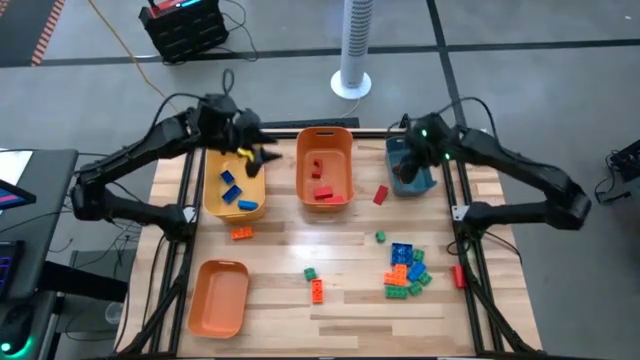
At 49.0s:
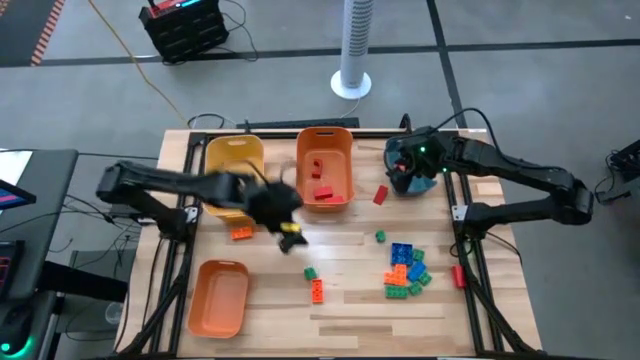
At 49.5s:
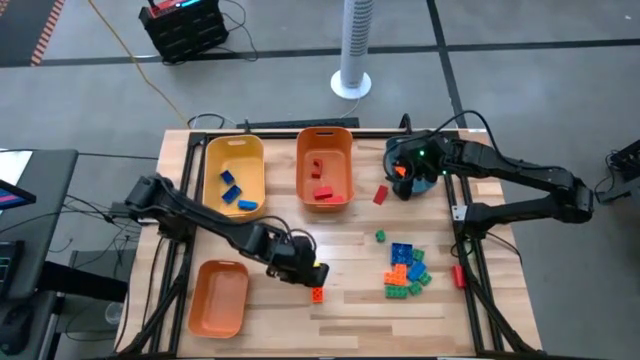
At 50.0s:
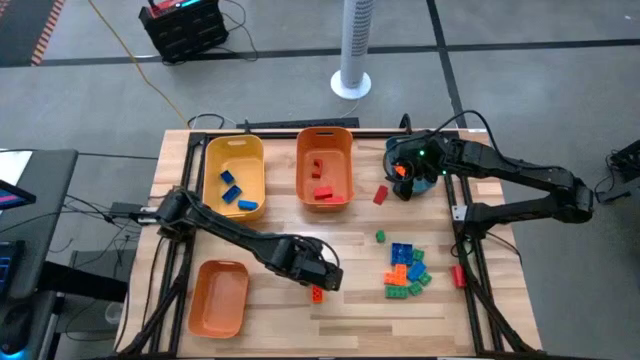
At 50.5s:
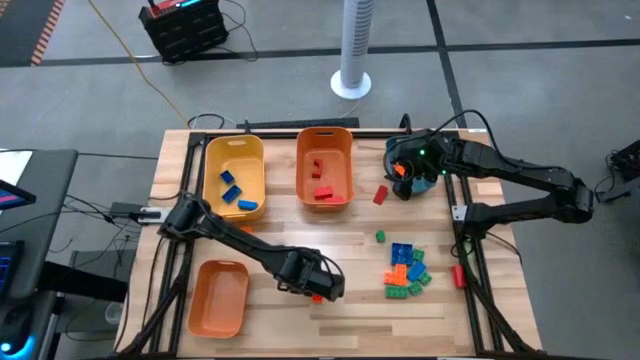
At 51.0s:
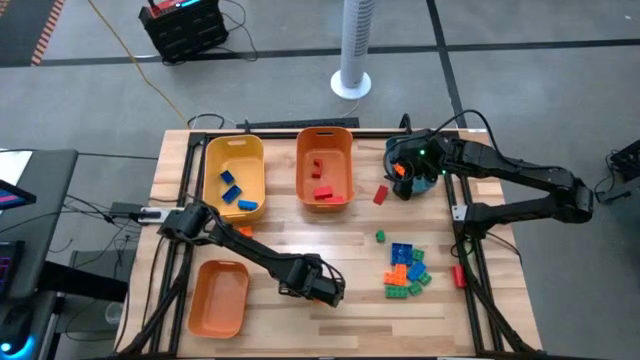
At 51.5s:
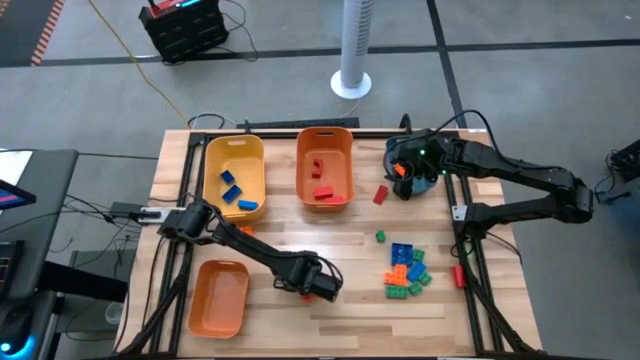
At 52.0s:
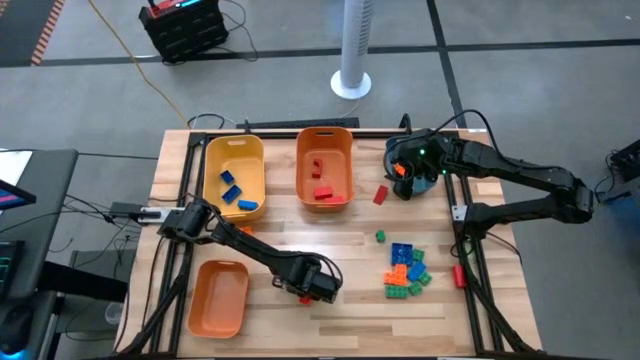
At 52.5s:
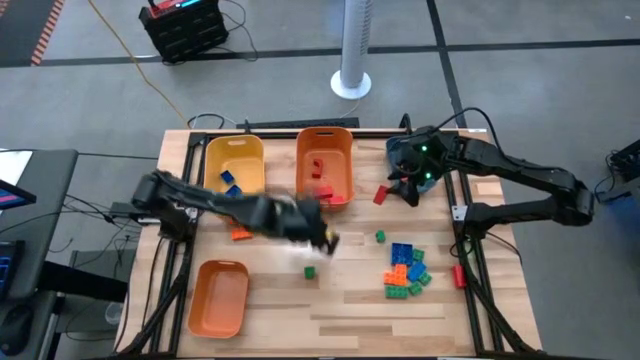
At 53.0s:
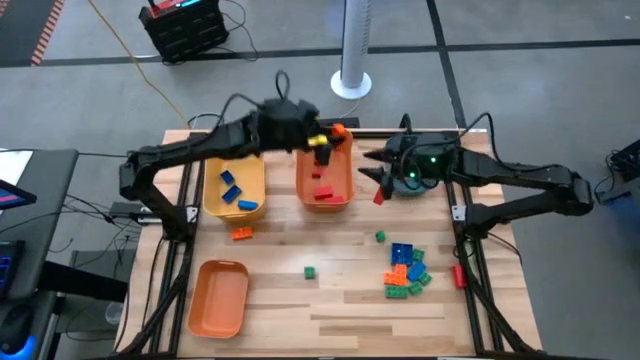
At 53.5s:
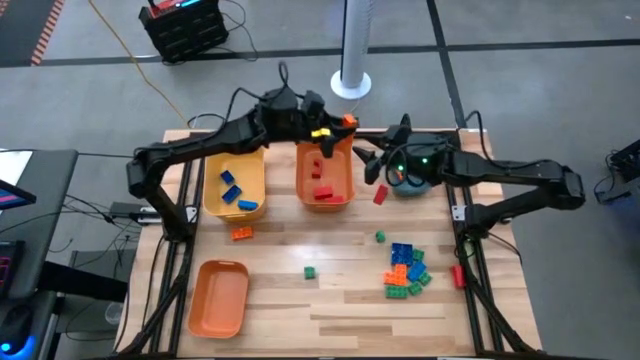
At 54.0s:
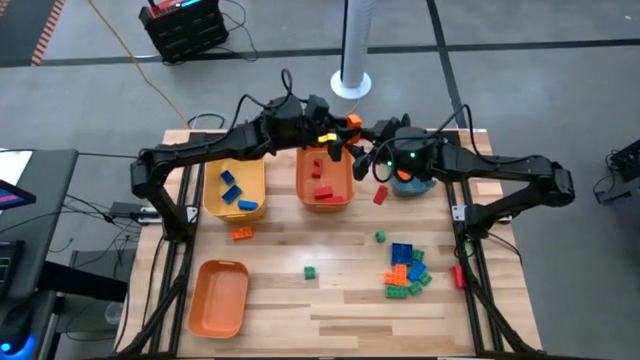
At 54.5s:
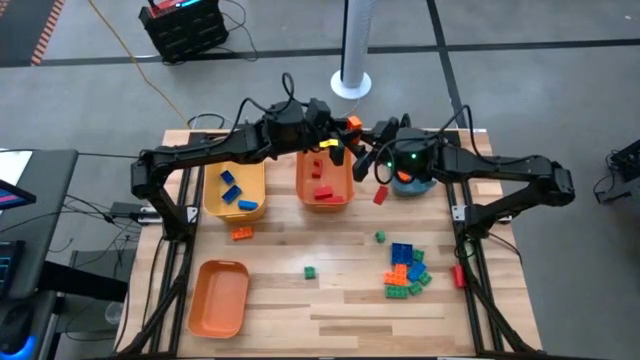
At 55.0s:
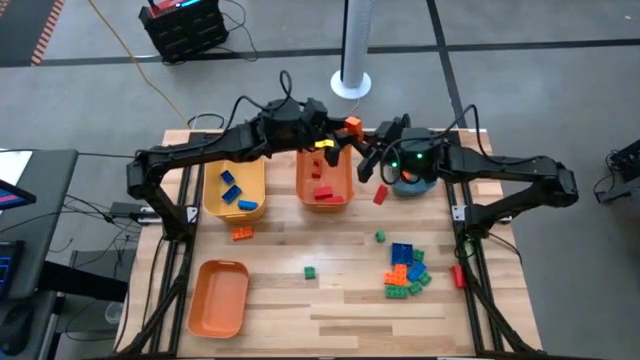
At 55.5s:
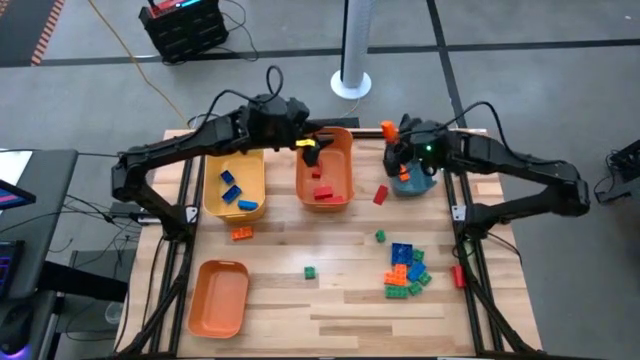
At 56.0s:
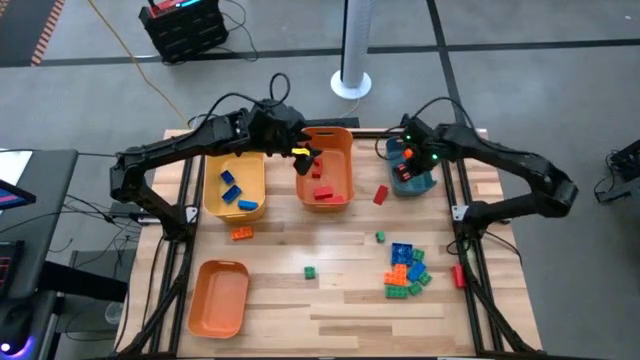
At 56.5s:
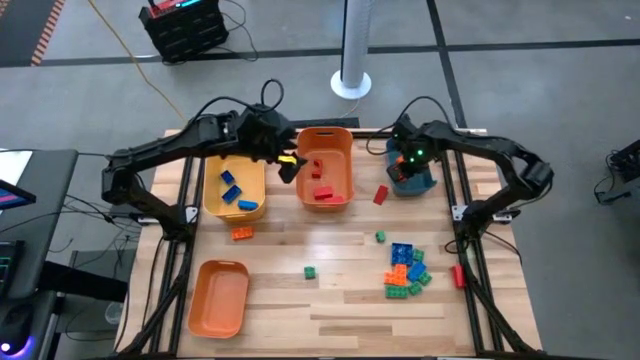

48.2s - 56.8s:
Task: Sort blocks
Put the orange game piece into the blue bin

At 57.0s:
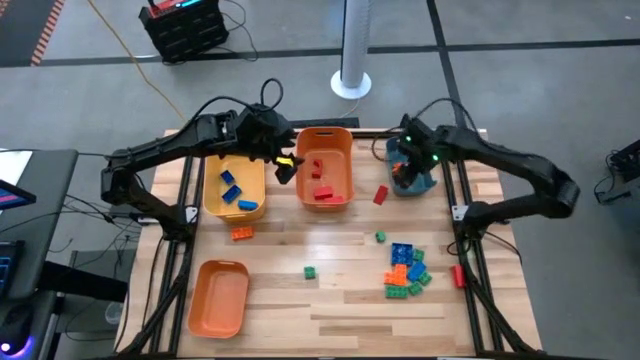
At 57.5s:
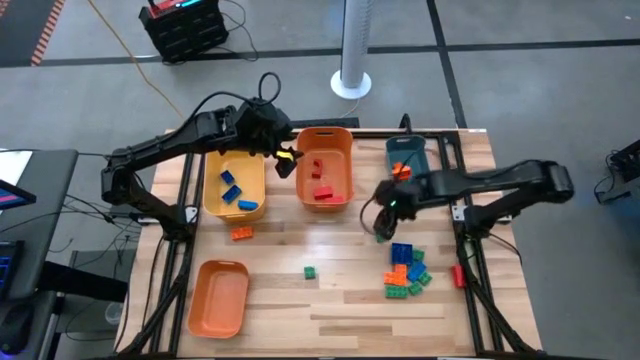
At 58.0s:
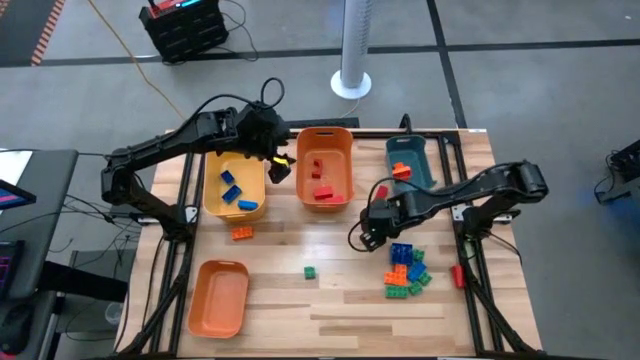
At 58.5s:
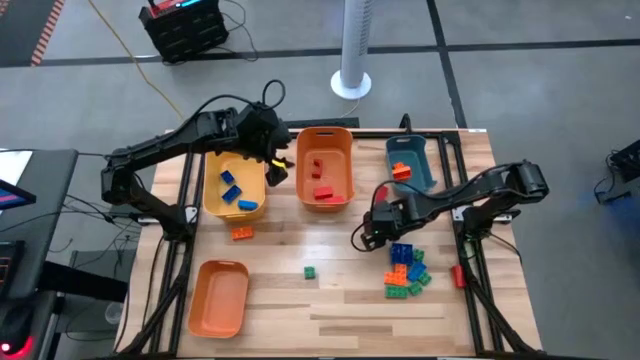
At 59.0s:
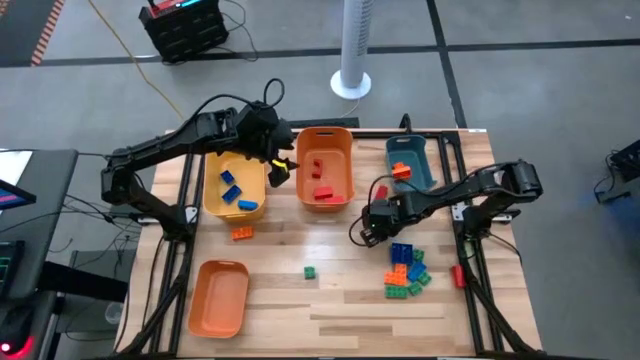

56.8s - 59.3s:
Put the green game piece into the bottom orange bin

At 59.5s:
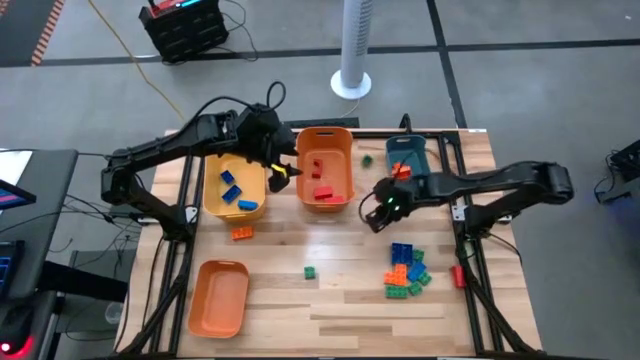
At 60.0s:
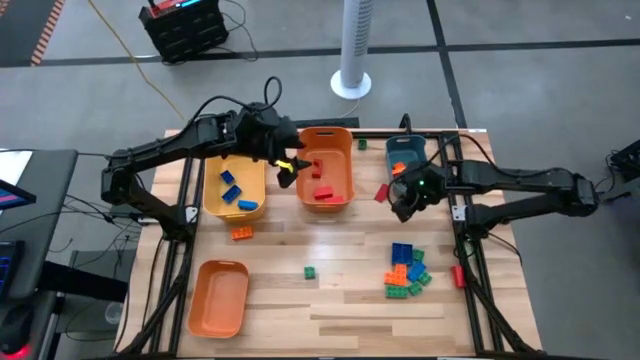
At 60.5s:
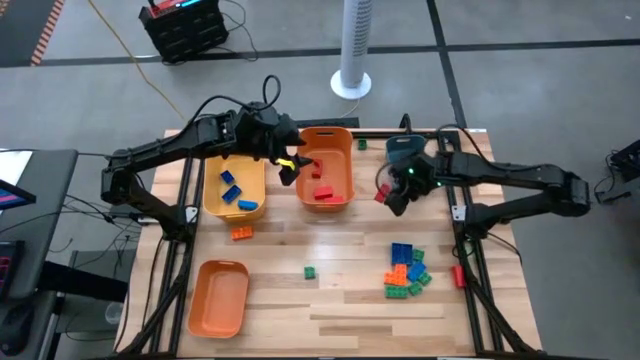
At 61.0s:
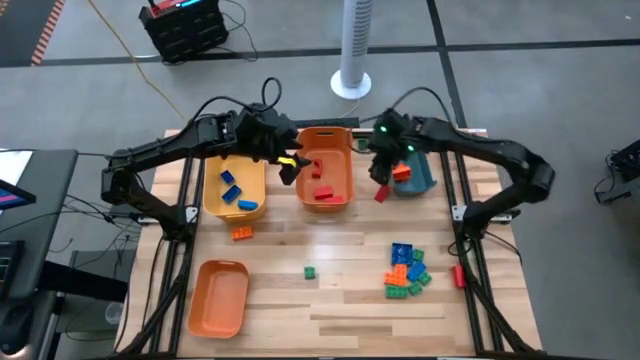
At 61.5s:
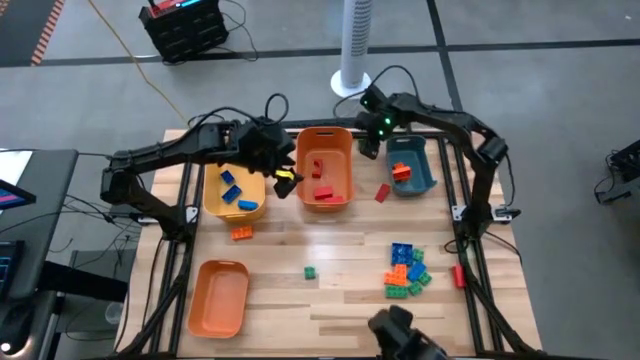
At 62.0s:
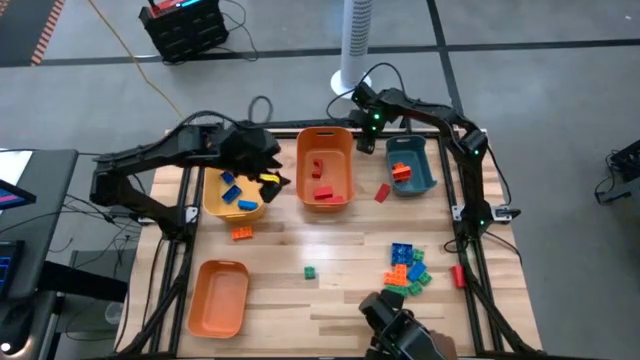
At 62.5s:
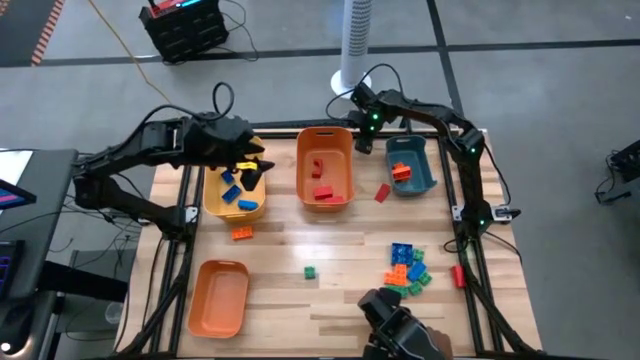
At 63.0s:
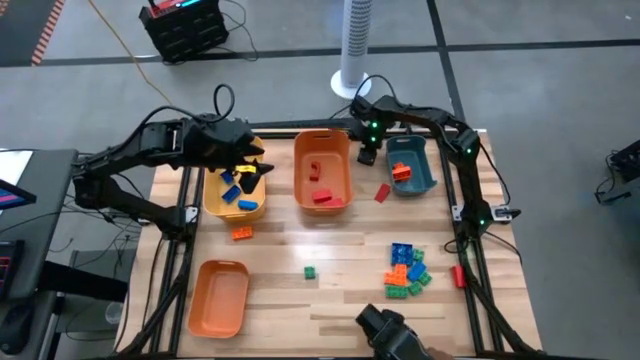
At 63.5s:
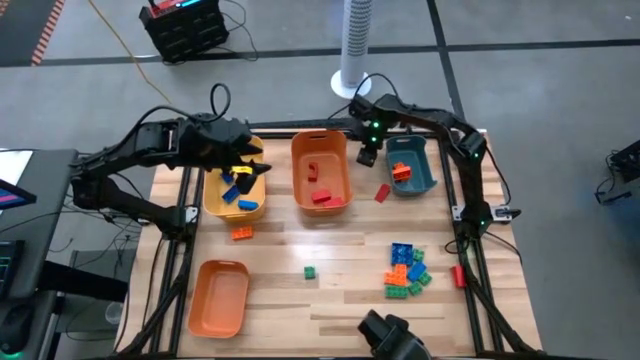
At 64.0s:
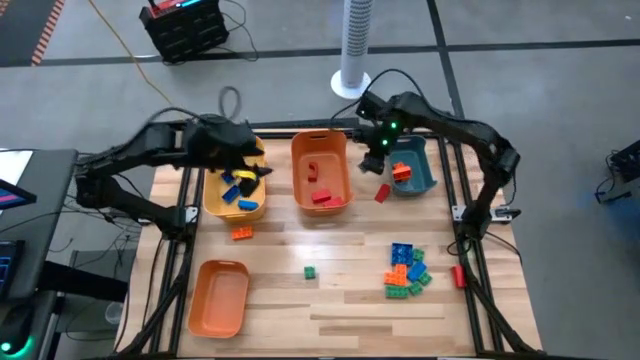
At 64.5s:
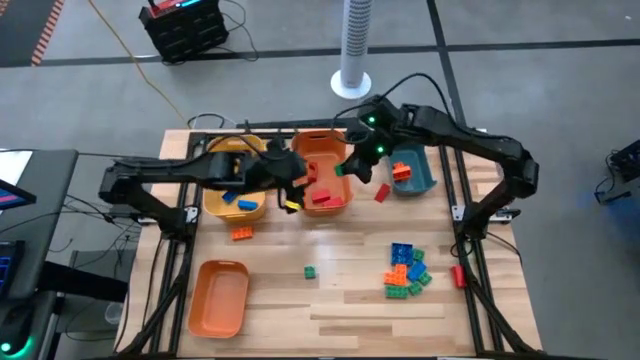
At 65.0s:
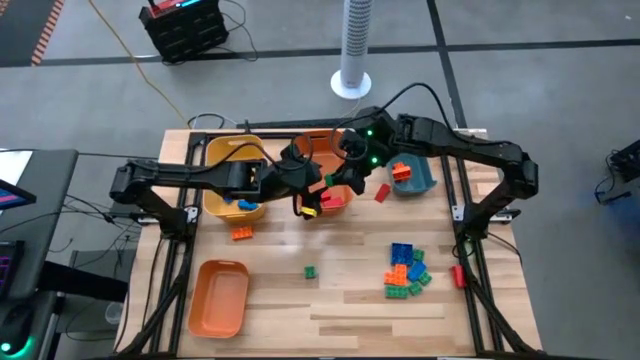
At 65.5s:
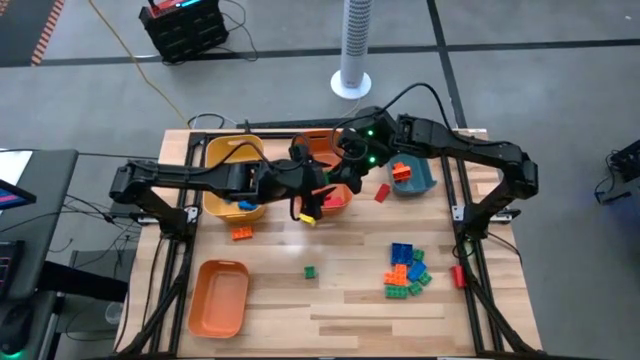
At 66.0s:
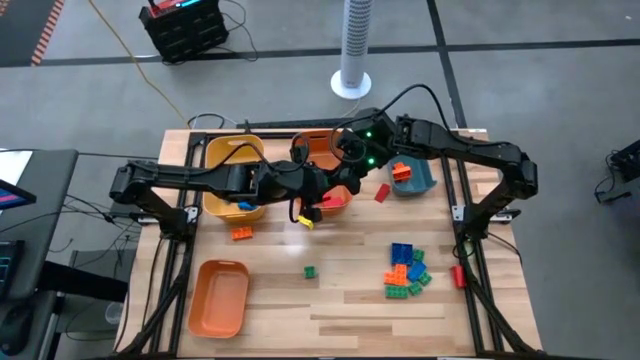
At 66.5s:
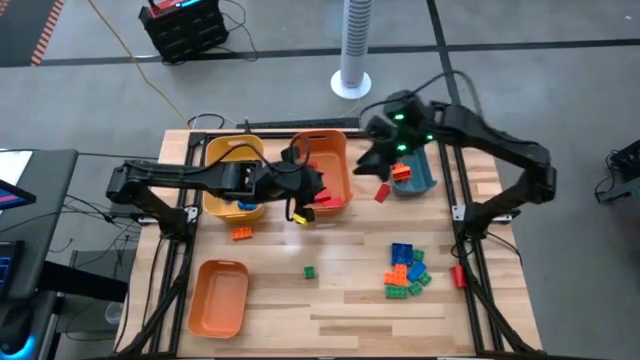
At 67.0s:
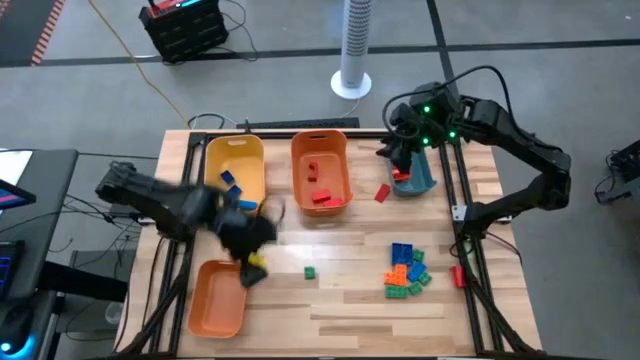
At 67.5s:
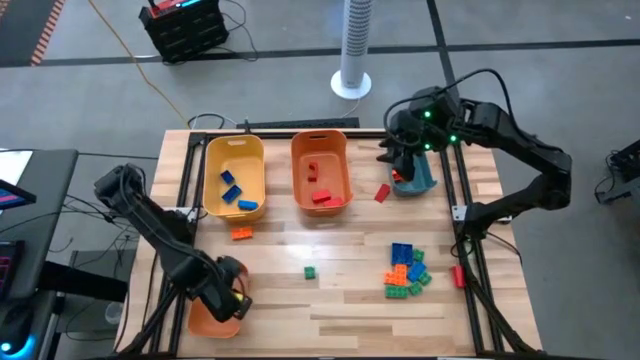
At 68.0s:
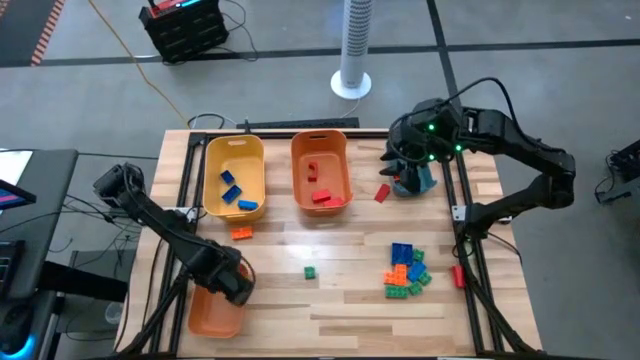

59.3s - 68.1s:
Put the green game piece into the bottom orange bin

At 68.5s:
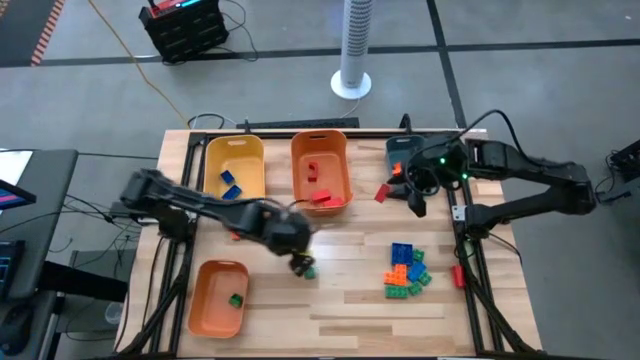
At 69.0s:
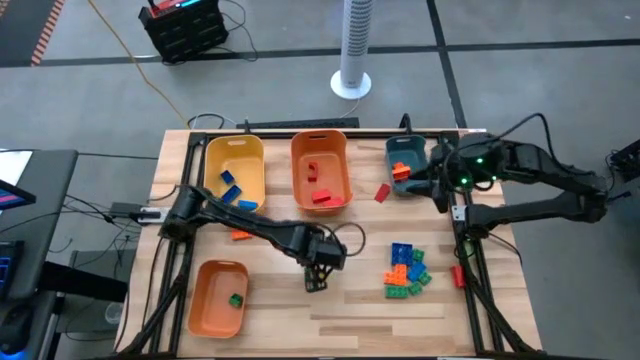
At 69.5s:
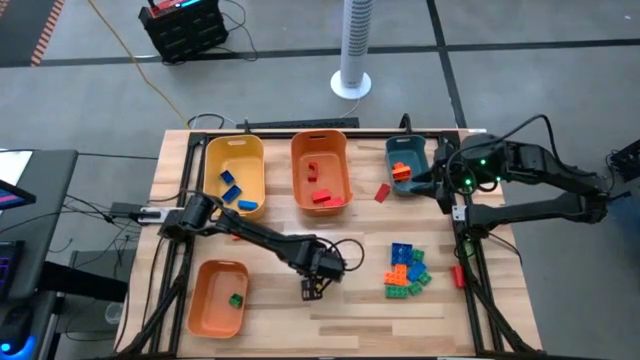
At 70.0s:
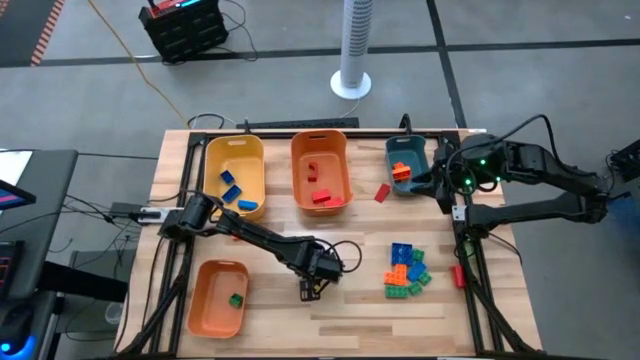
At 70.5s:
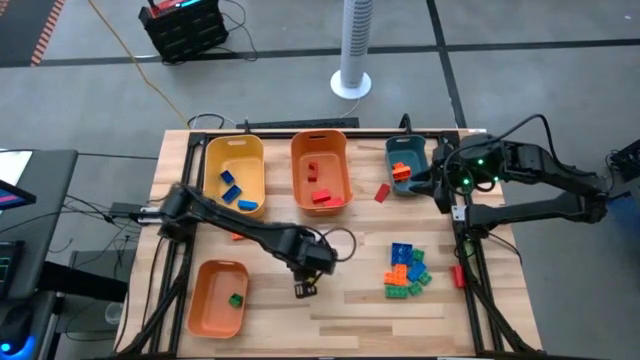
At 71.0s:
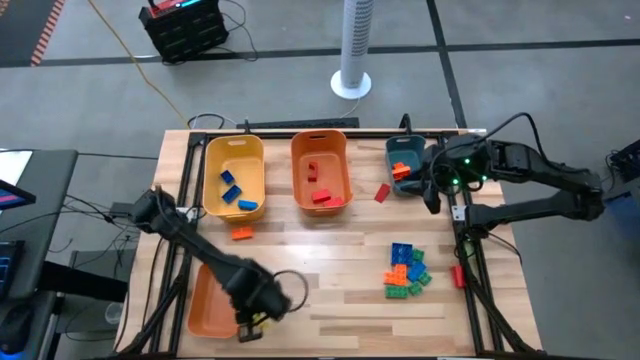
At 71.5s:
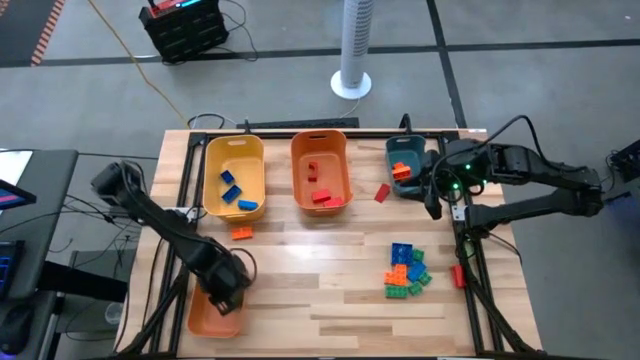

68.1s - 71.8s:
Put the green game piece into the bottom orange bin
